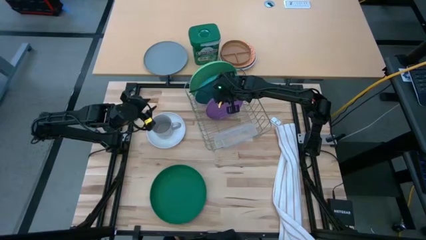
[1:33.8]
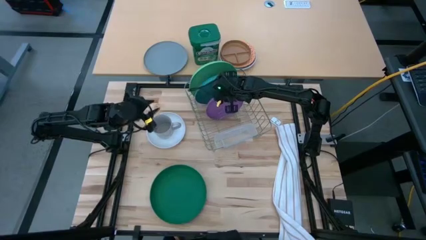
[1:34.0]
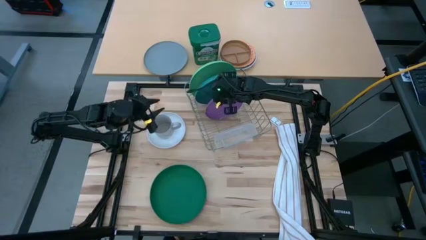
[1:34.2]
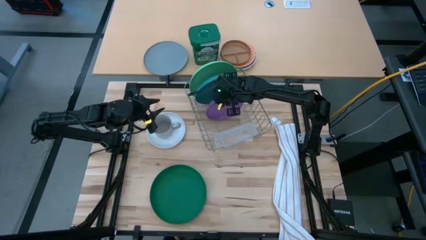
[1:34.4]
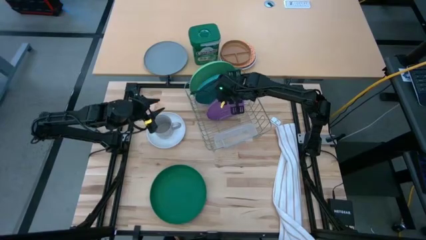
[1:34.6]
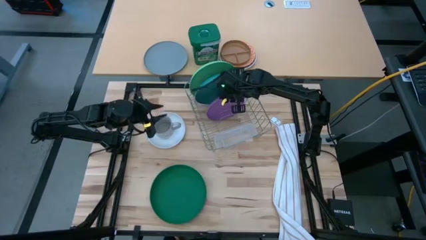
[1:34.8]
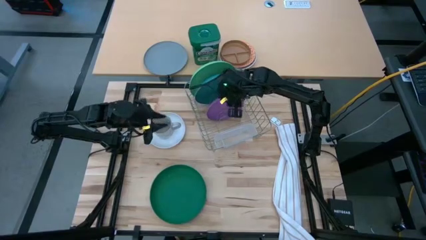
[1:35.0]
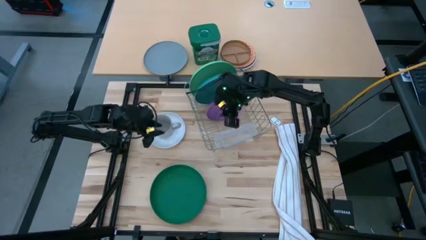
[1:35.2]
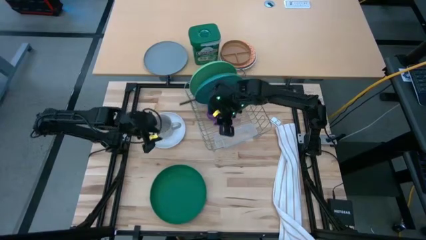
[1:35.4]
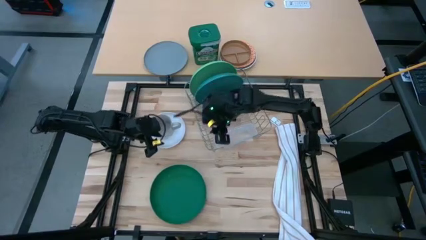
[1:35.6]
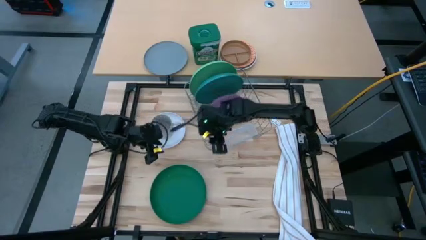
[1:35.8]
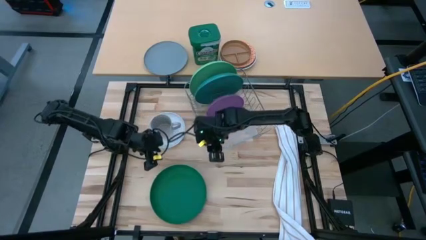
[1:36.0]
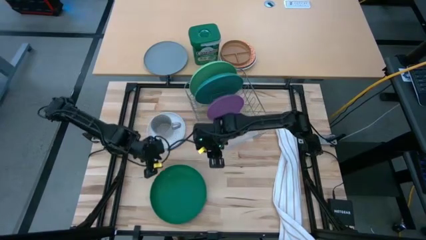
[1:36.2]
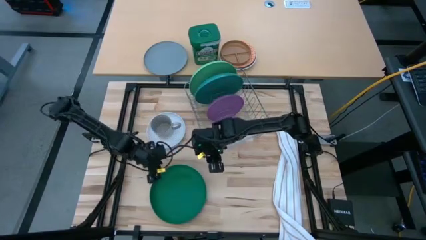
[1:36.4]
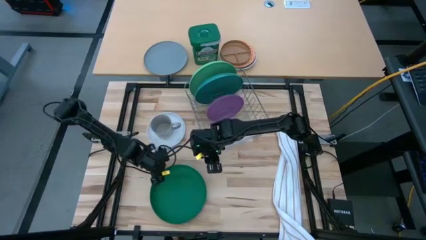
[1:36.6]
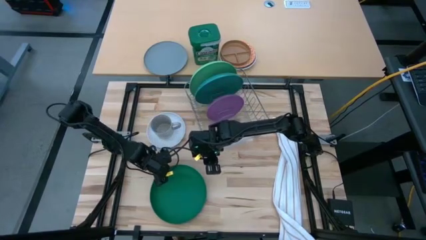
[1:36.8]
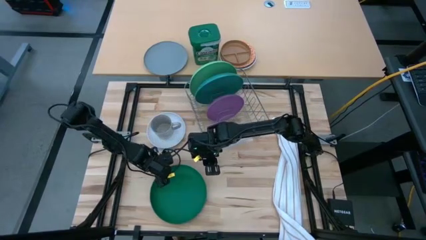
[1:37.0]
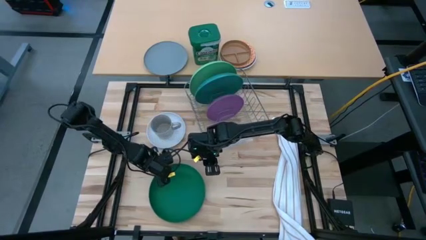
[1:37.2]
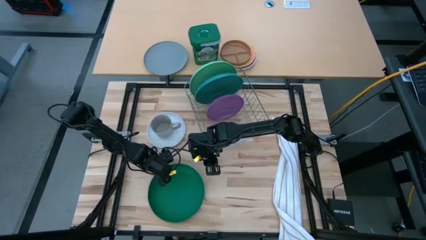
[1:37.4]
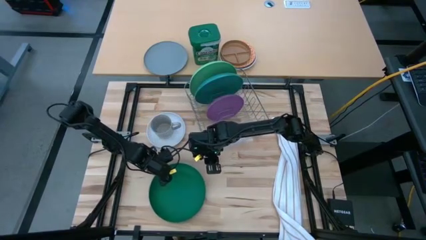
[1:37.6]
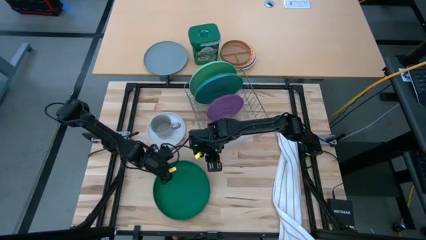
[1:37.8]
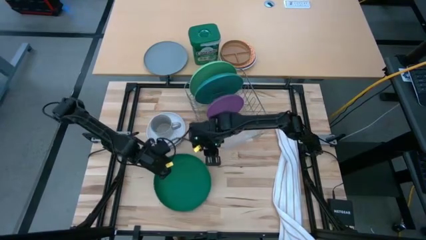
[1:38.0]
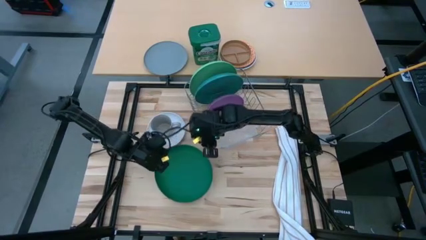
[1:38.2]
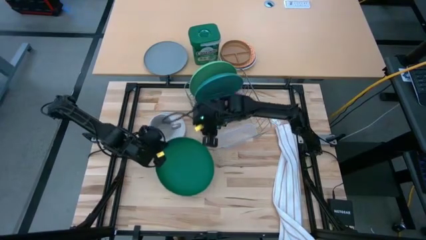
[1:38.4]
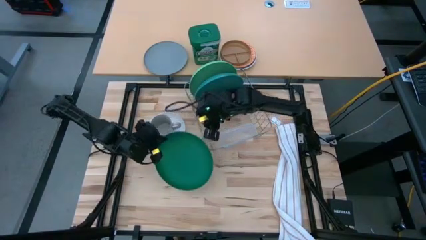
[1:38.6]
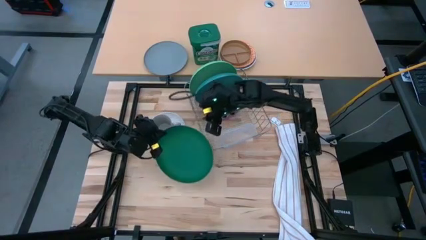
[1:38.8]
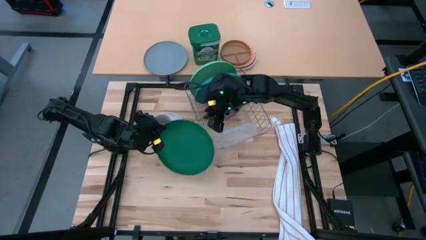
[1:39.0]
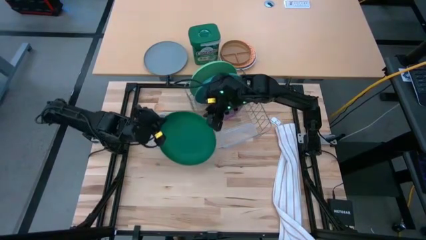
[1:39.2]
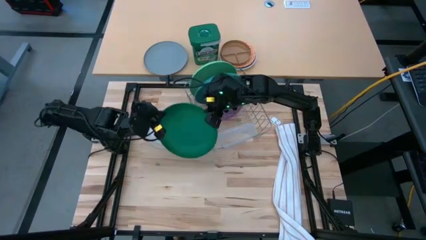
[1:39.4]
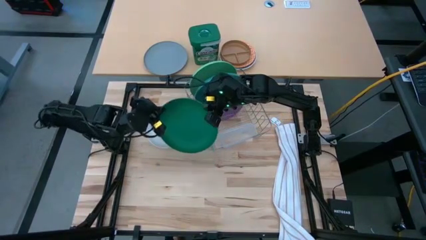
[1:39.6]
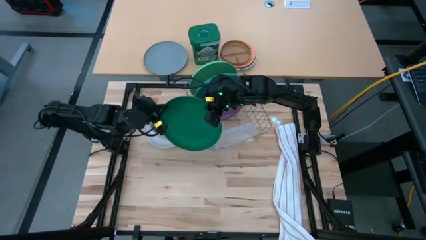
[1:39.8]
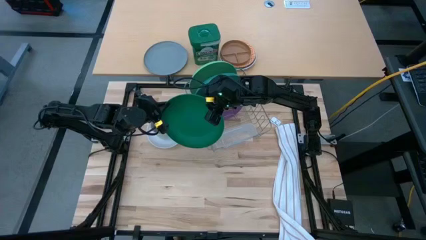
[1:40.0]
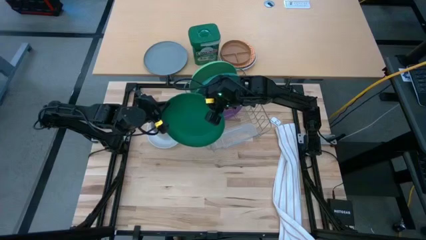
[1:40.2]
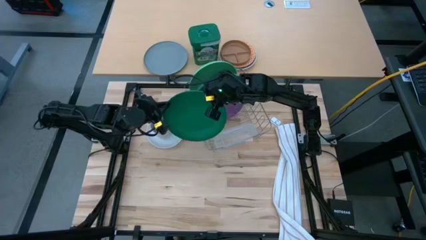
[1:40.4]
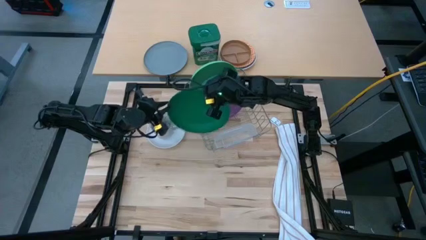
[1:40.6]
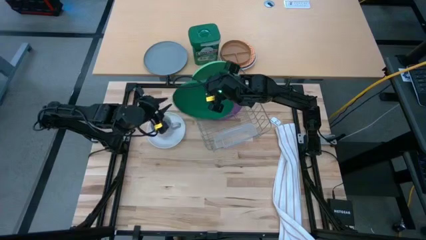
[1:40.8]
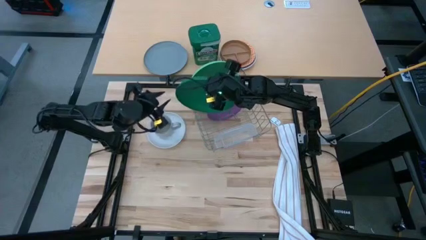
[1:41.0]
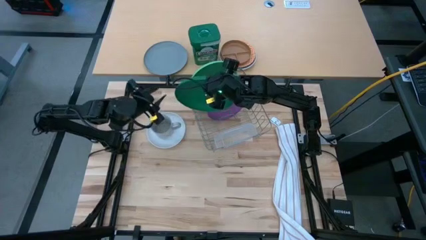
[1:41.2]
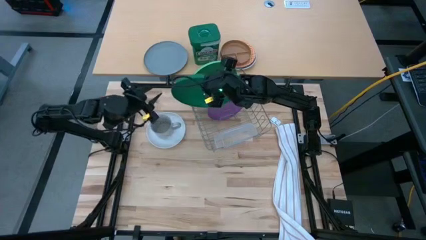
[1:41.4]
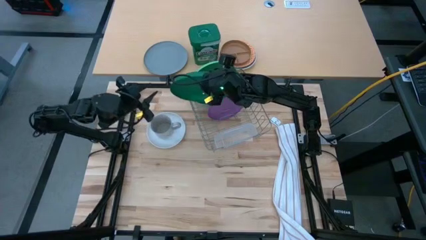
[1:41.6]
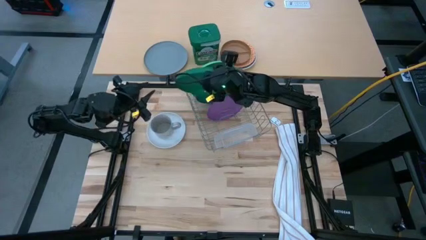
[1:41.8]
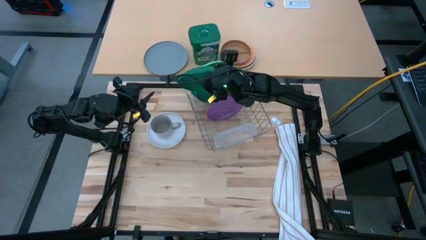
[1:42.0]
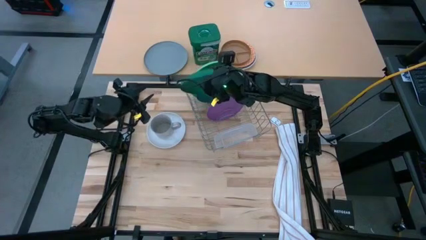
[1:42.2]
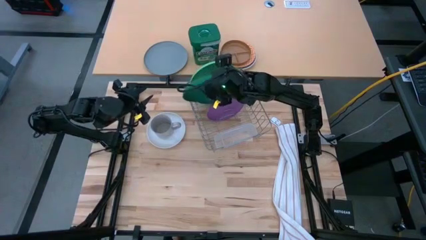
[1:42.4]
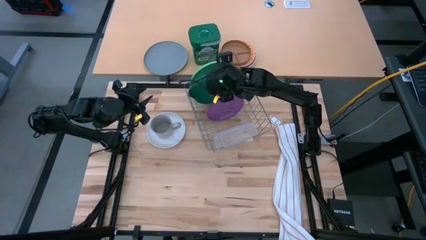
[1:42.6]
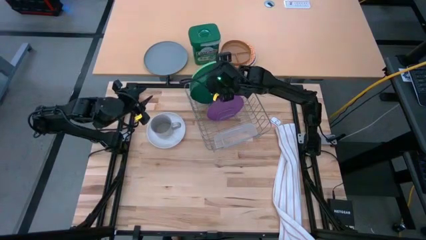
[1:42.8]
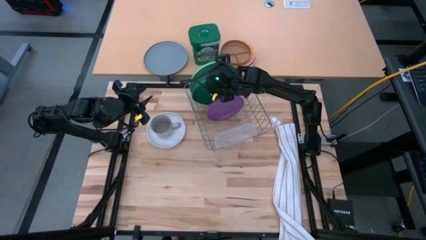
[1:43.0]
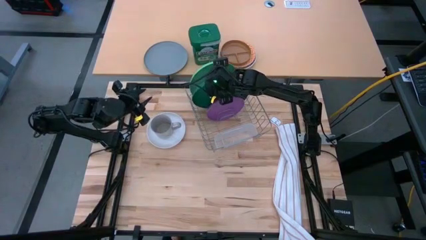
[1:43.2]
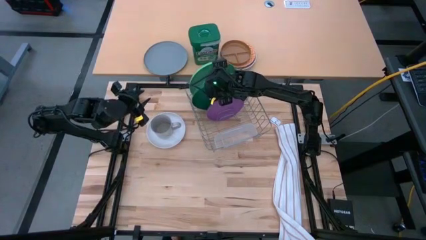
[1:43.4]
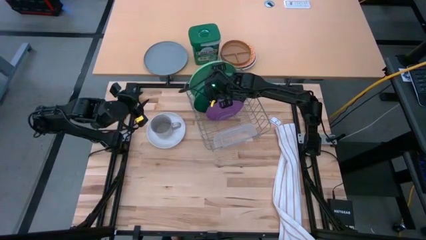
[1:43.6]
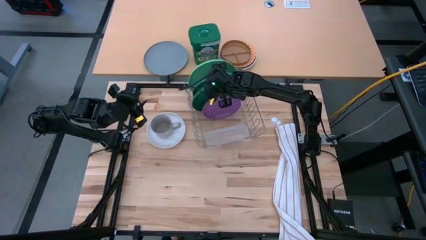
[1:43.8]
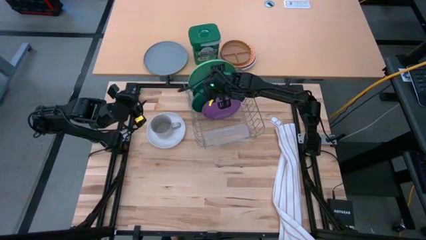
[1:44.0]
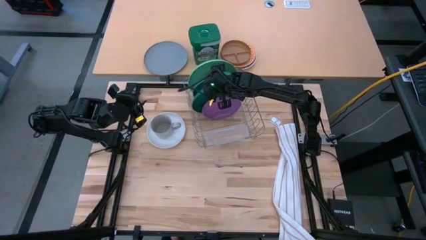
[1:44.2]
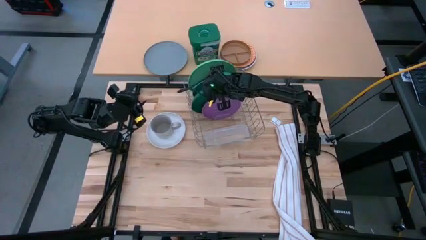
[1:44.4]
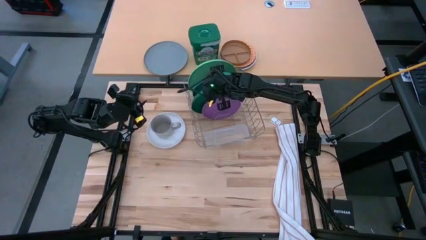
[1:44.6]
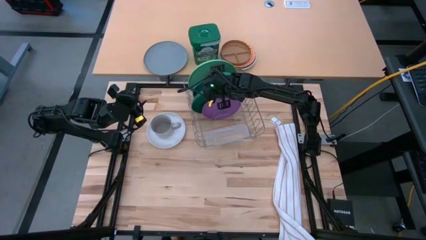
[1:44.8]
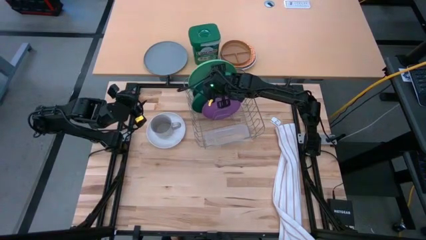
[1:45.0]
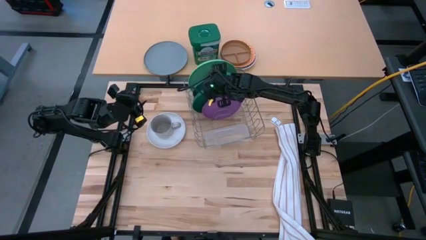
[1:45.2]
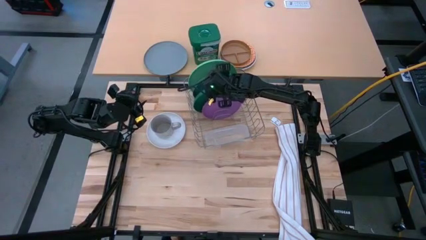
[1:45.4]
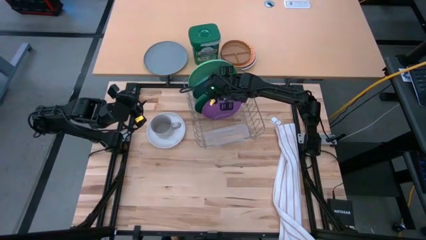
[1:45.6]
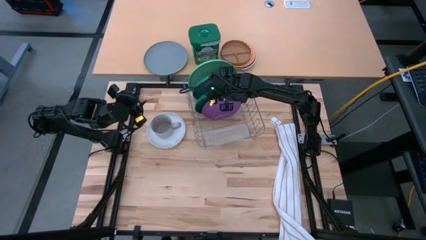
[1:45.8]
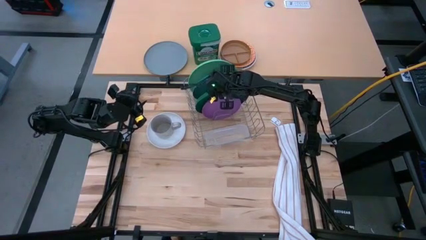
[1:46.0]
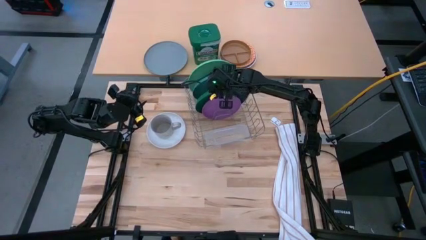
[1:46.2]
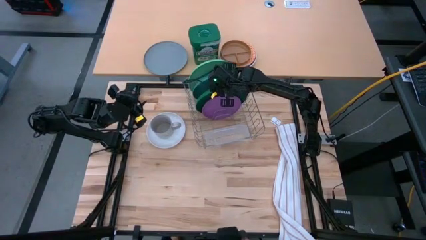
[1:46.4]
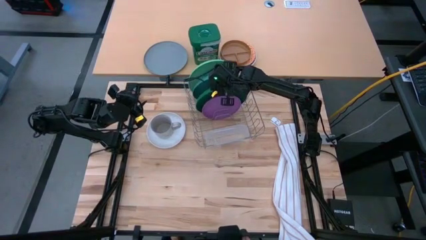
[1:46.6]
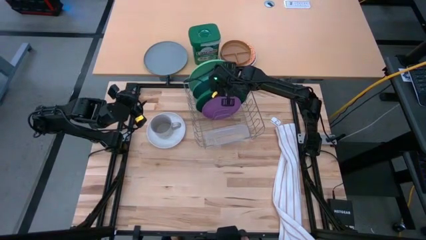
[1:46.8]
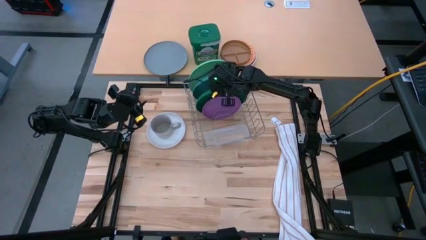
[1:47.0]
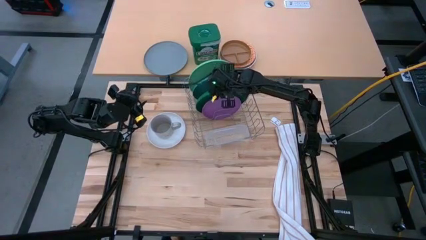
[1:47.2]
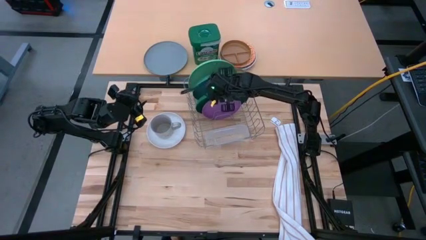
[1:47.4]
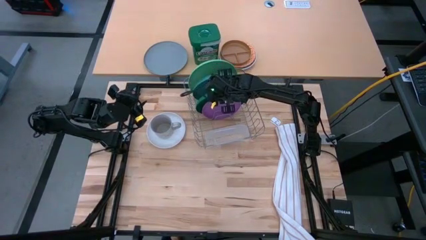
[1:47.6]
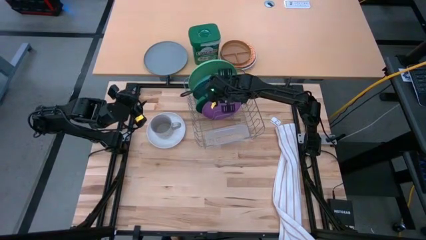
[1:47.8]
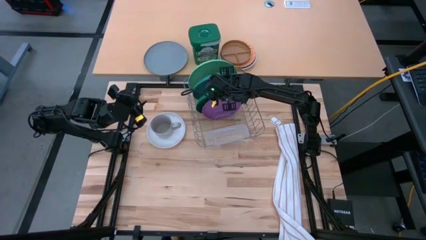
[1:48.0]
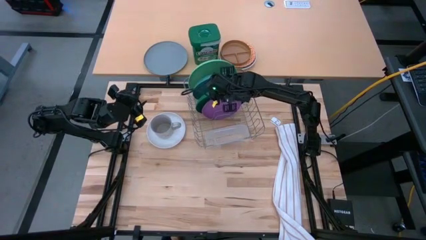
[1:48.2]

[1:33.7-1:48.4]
Task: Sort dishes
Put the dark green plate into the dish rack

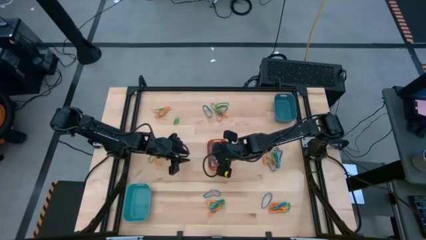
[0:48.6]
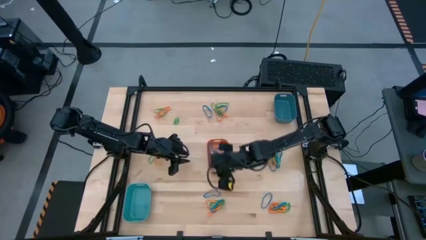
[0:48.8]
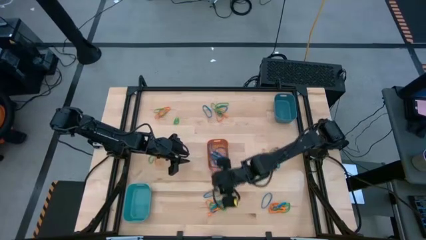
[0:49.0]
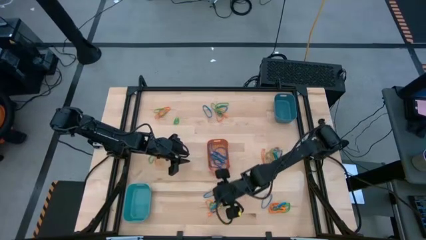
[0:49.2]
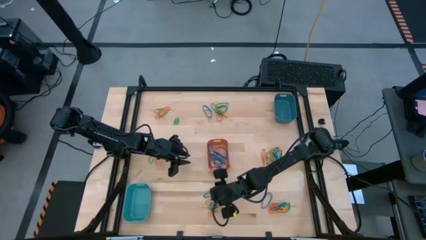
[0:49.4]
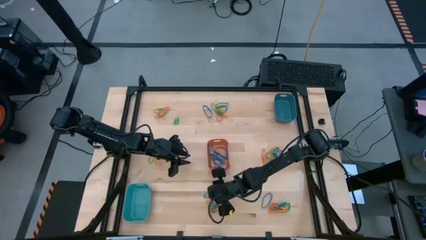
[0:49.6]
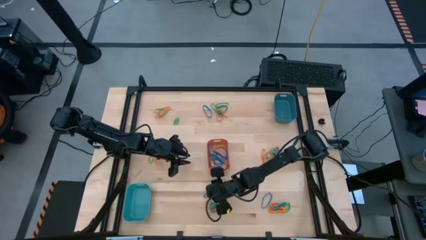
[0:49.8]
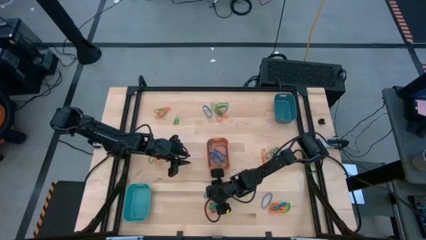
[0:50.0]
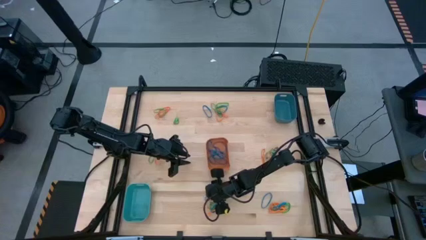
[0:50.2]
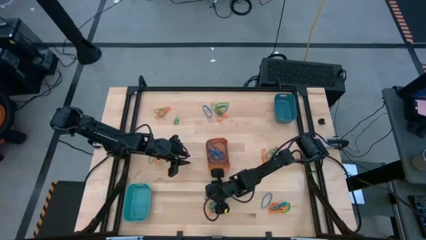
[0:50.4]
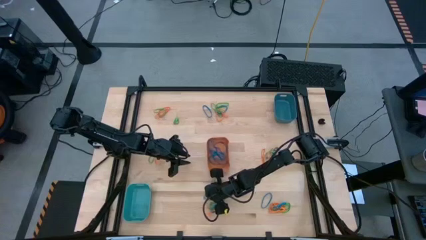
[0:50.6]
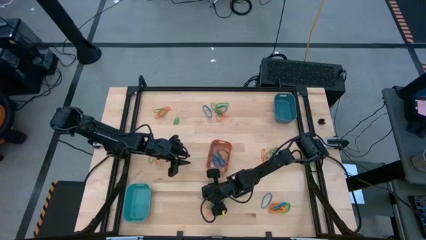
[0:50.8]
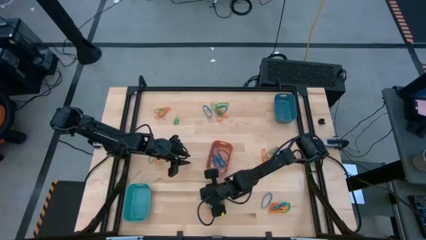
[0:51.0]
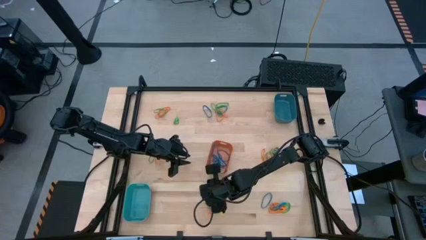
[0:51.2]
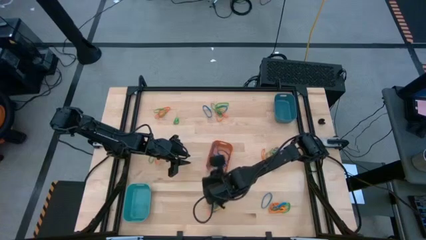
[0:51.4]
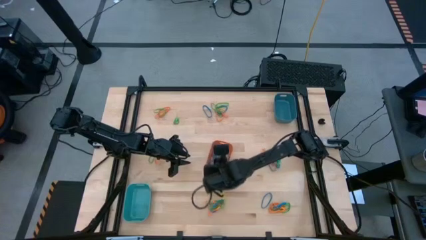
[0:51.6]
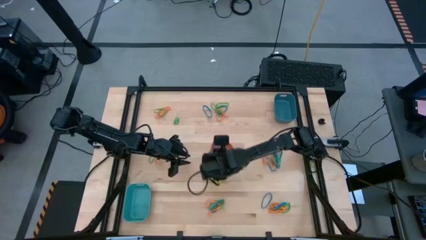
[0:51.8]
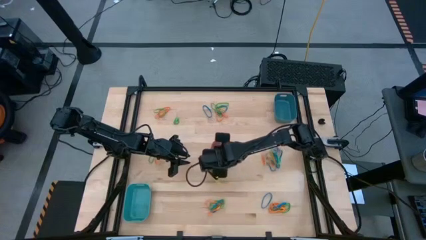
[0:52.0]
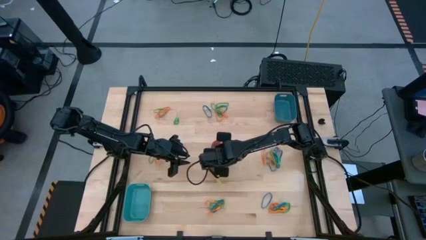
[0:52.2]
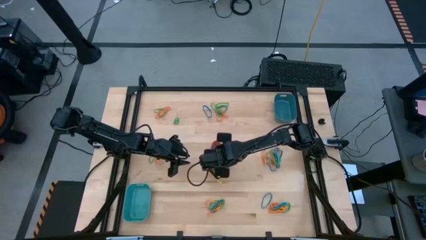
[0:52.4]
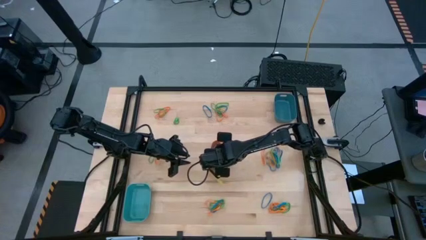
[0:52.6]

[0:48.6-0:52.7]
Task: Sort rubber bands into baskets
Put the blue rubber band into the orange bin
